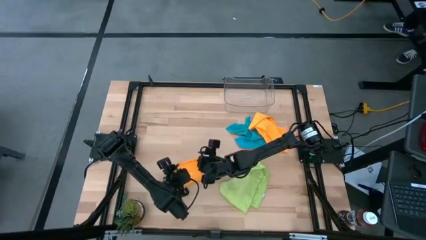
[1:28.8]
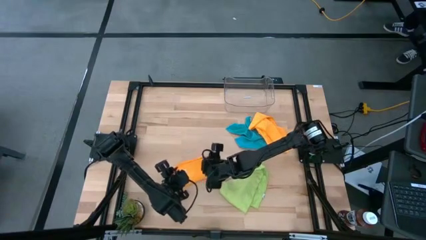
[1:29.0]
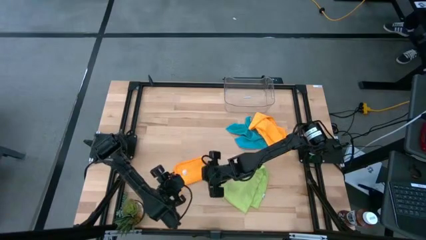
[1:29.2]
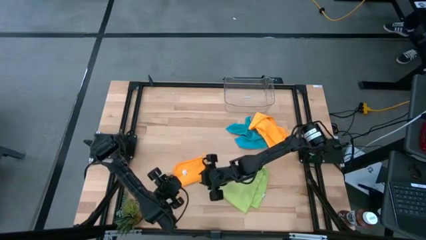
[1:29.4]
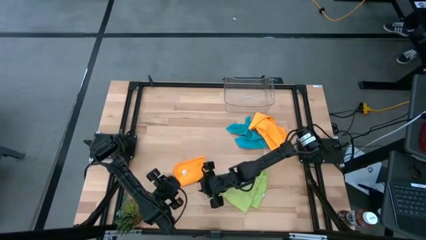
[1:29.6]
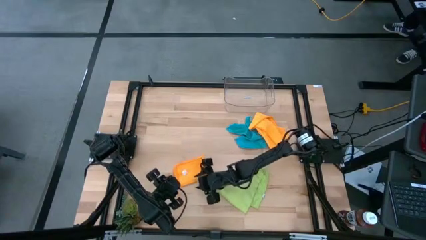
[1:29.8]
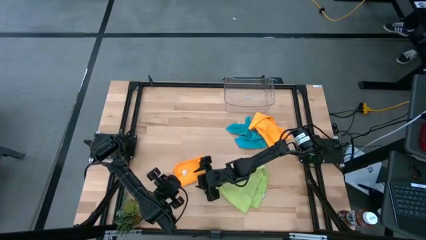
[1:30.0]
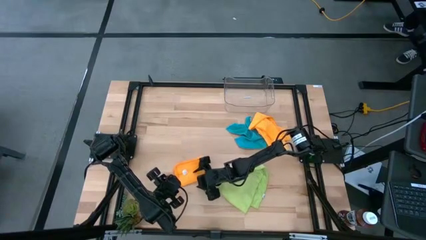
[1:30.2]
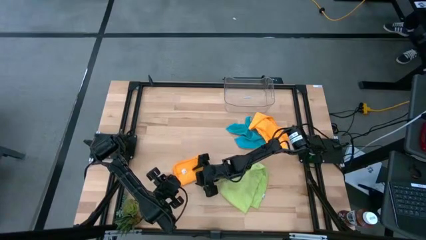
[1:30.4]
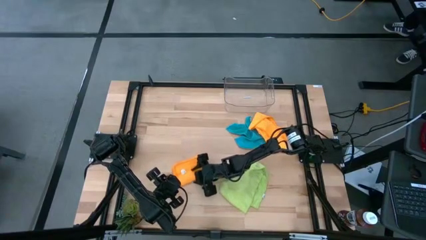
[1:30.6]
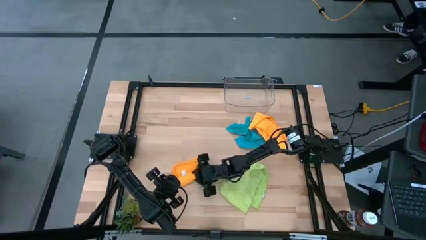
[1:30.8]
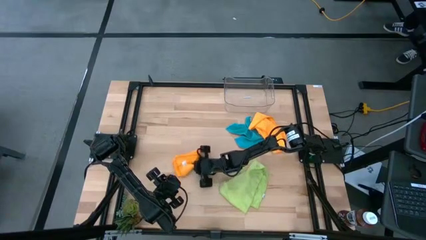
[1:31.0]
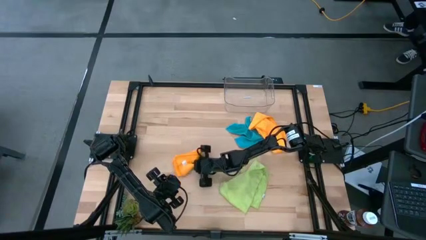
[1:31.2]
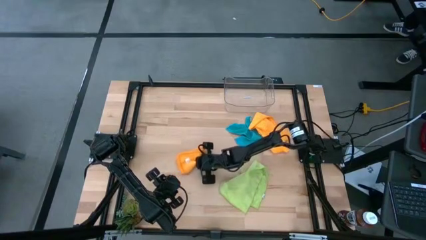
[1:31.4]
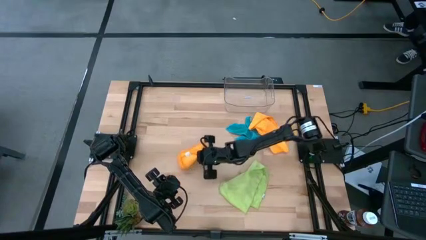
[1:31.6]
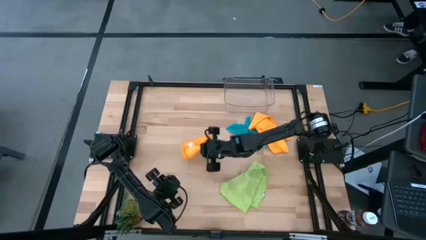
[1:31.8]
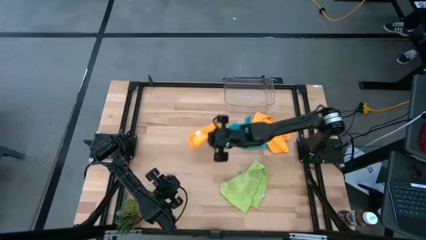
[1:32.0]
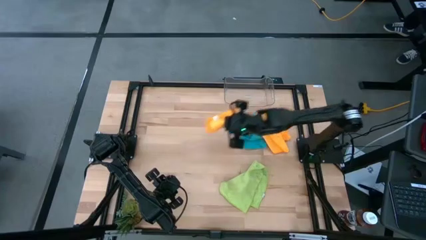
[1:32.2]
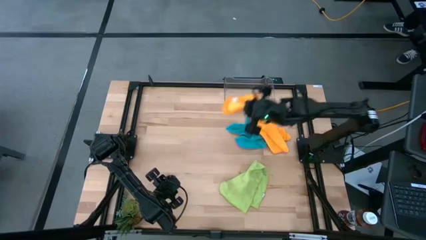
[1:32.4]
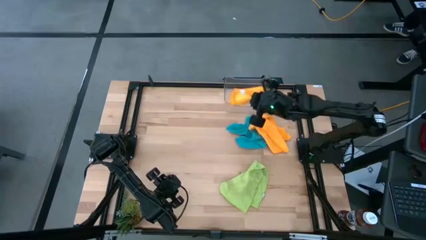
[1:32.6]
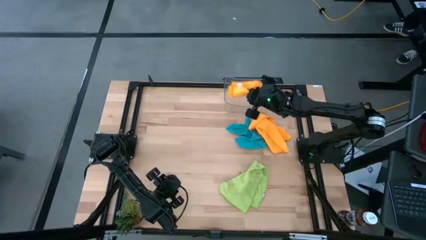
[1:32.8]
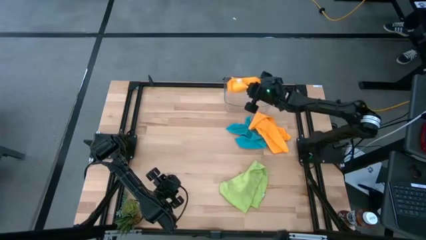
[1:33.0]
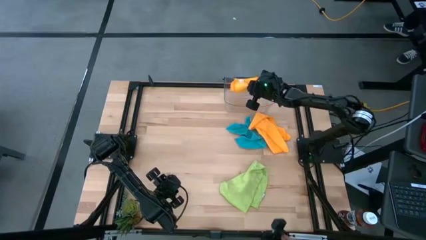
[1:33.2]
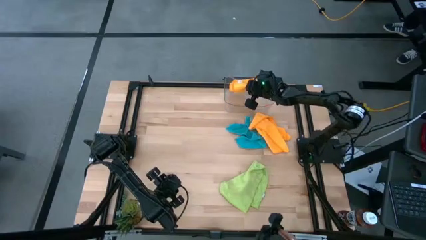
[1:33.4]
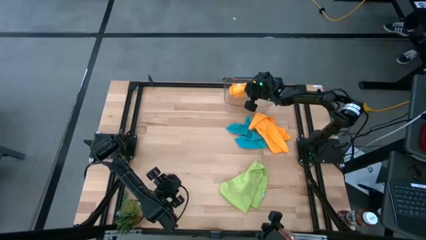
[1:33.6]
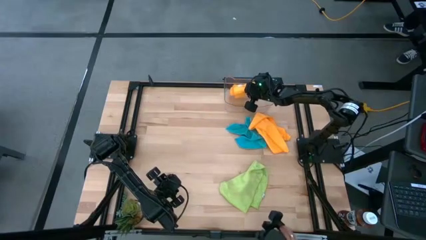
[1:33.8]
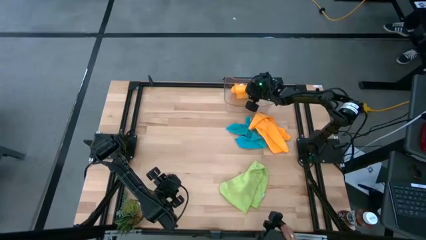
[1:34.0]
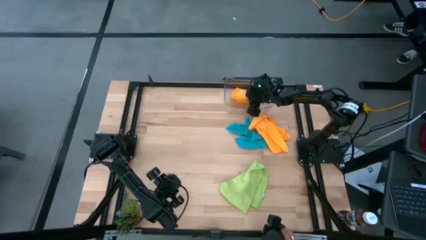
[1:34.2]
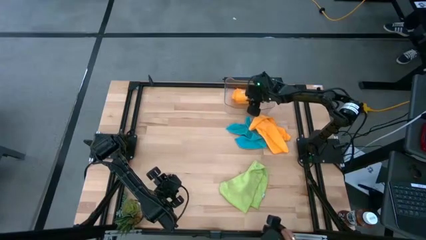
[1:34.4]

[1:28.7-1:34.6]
Task: Fold microfiber towels
Put the left yellow microfiber cloth into the transparent bin

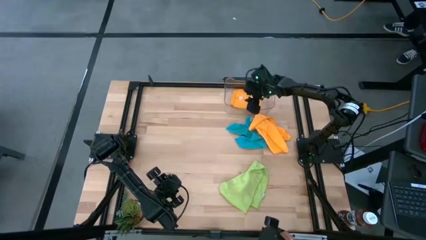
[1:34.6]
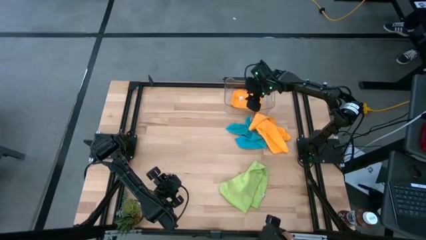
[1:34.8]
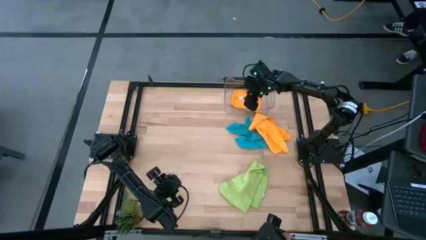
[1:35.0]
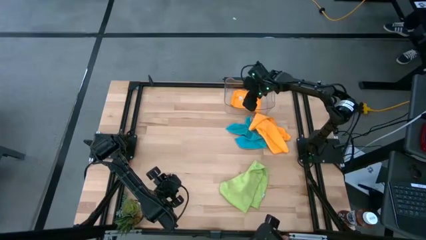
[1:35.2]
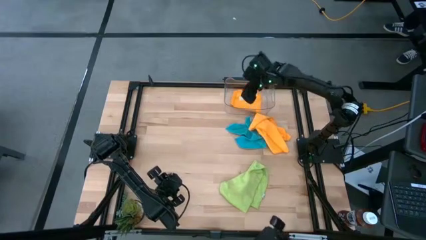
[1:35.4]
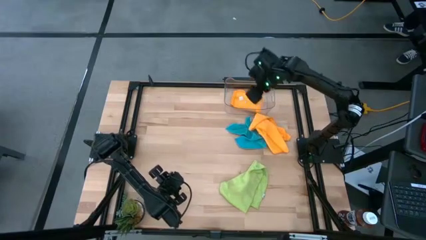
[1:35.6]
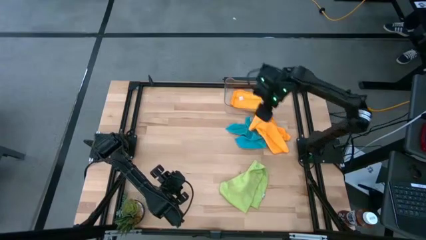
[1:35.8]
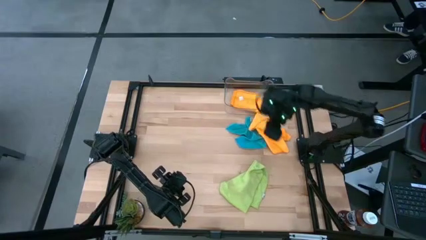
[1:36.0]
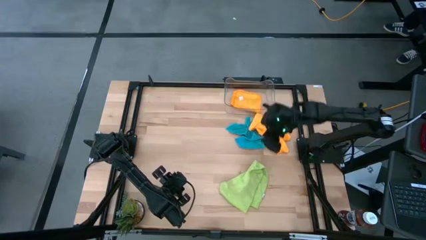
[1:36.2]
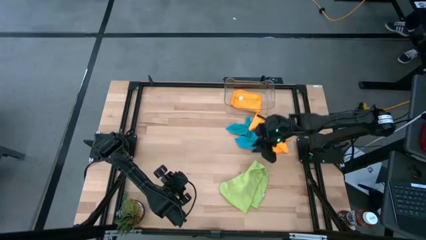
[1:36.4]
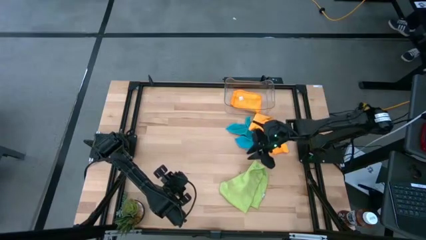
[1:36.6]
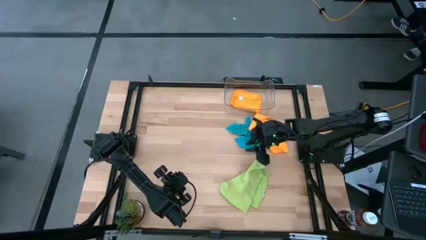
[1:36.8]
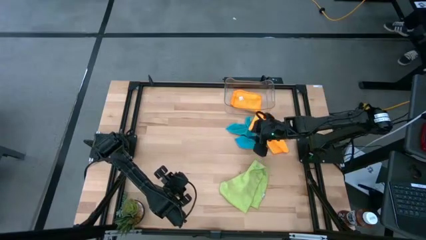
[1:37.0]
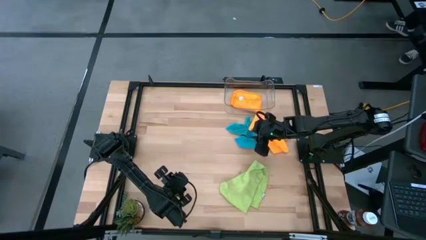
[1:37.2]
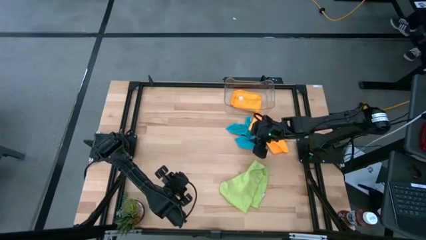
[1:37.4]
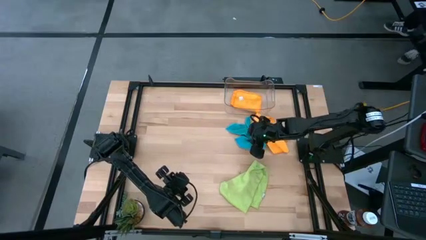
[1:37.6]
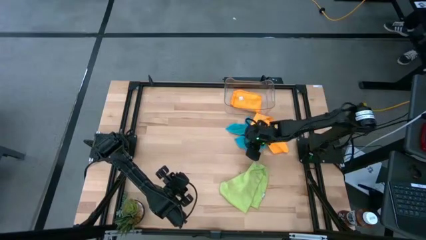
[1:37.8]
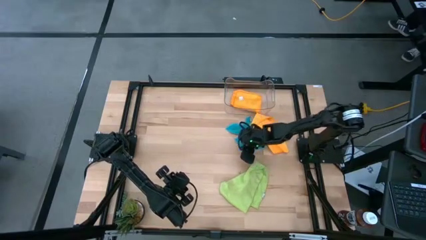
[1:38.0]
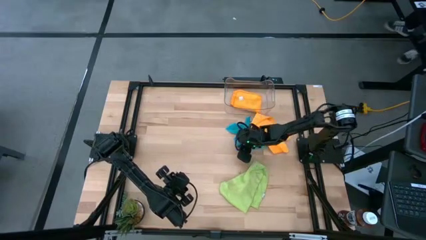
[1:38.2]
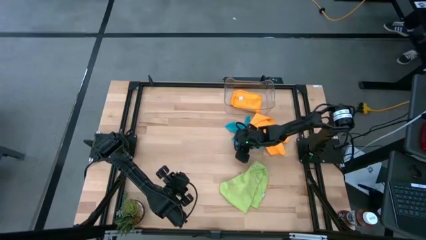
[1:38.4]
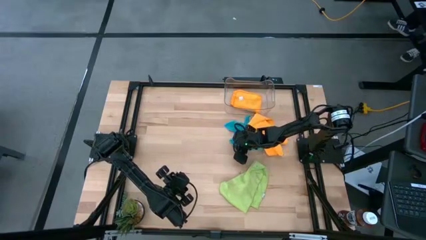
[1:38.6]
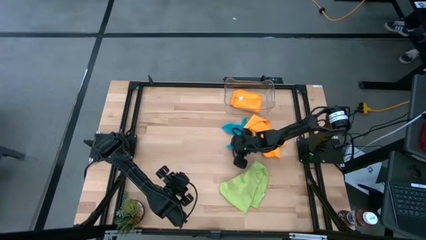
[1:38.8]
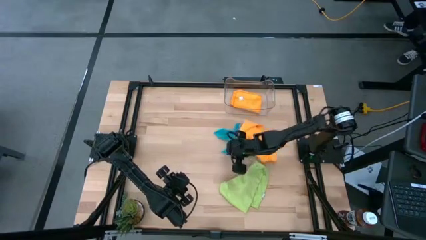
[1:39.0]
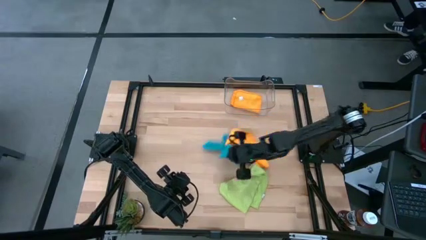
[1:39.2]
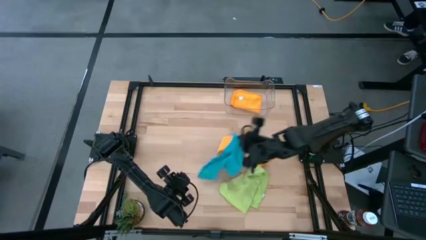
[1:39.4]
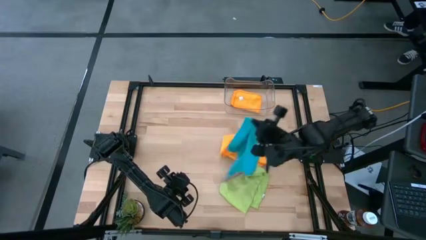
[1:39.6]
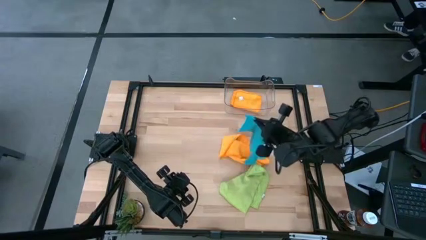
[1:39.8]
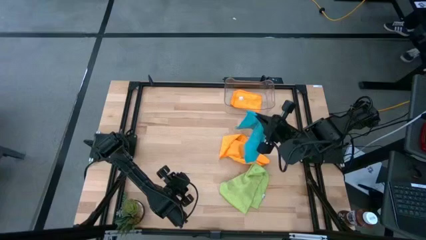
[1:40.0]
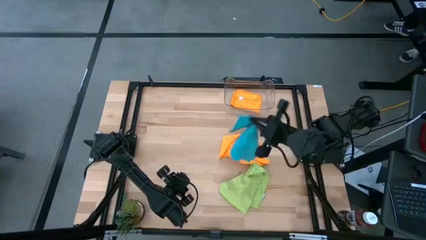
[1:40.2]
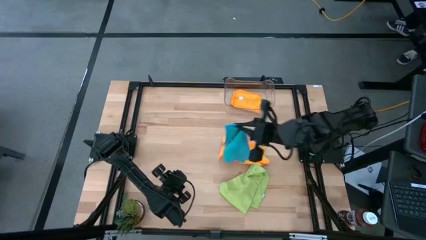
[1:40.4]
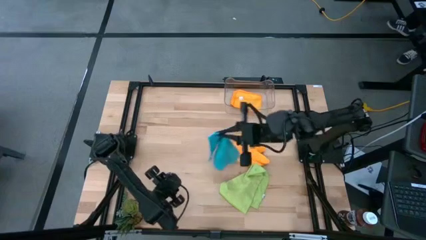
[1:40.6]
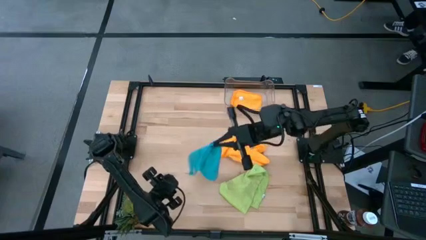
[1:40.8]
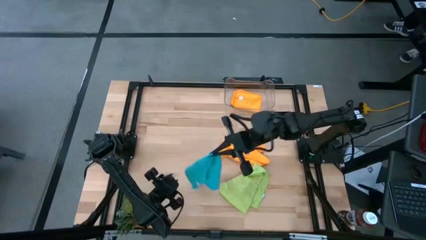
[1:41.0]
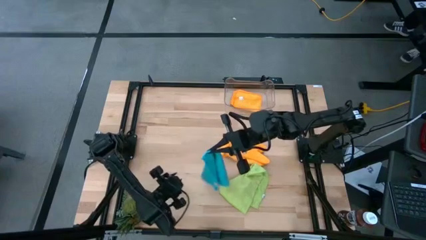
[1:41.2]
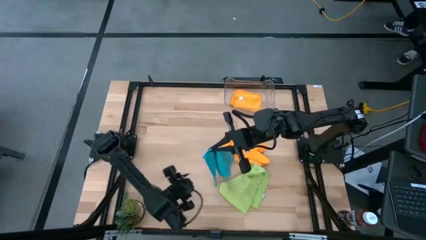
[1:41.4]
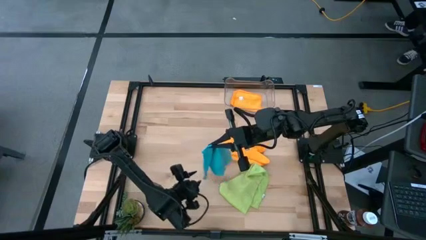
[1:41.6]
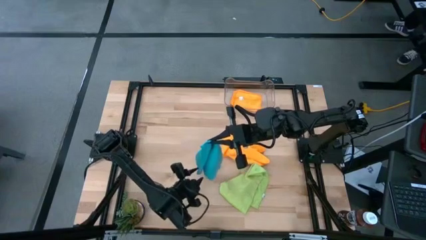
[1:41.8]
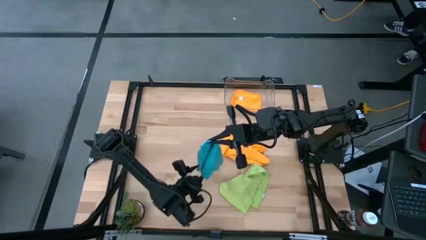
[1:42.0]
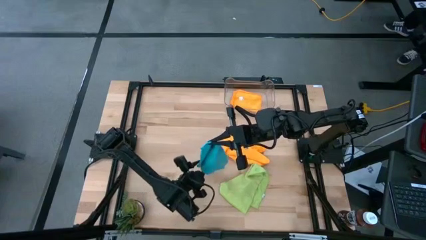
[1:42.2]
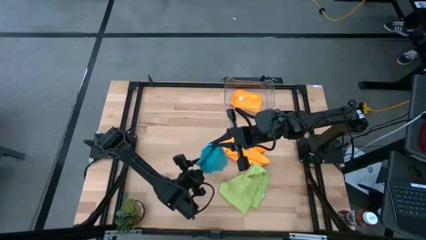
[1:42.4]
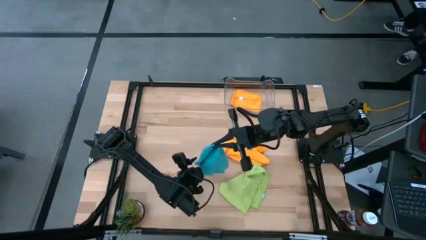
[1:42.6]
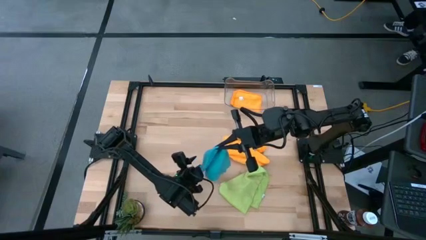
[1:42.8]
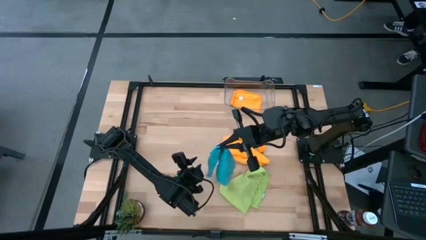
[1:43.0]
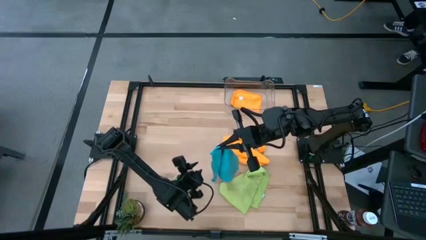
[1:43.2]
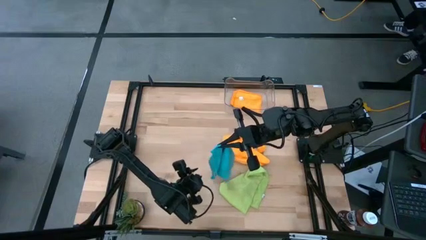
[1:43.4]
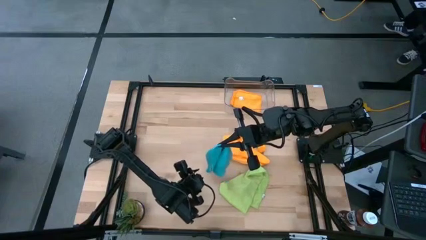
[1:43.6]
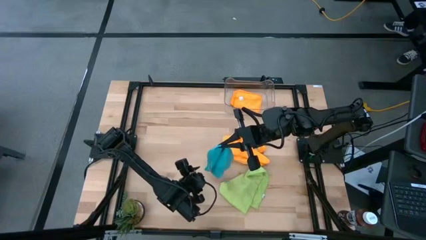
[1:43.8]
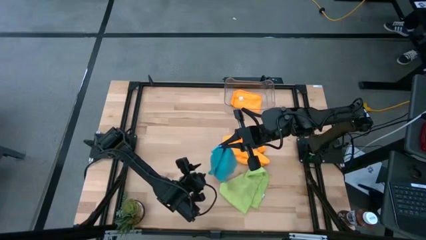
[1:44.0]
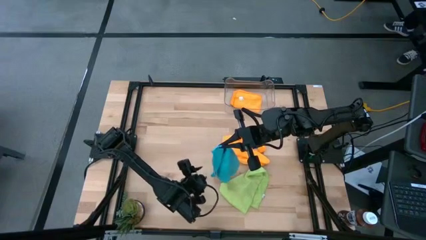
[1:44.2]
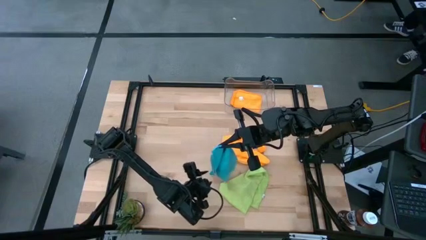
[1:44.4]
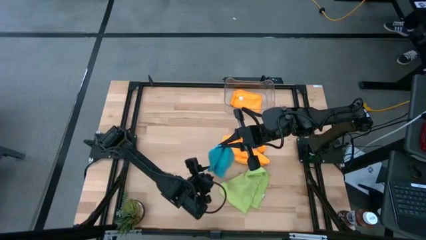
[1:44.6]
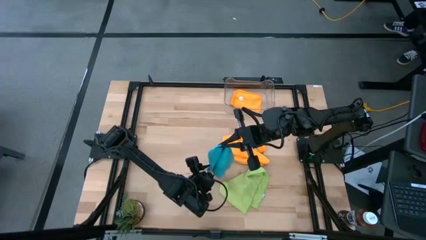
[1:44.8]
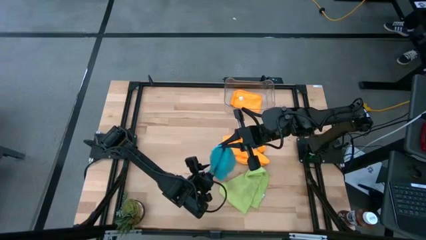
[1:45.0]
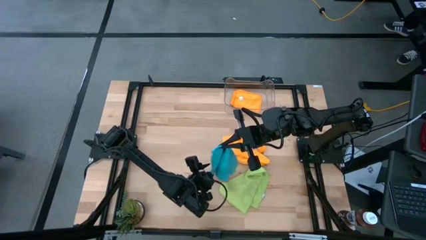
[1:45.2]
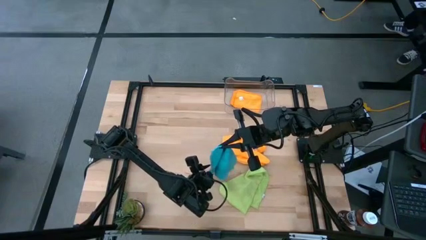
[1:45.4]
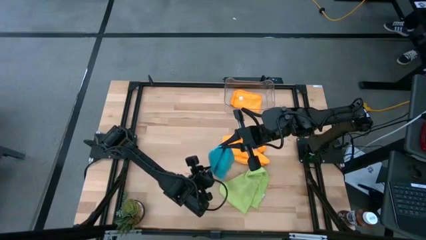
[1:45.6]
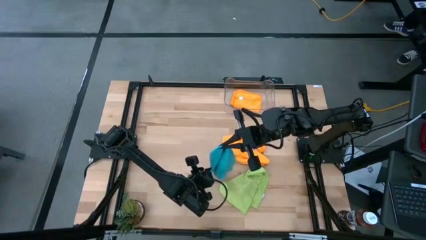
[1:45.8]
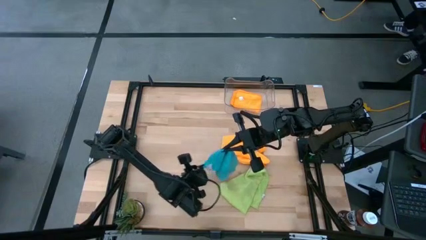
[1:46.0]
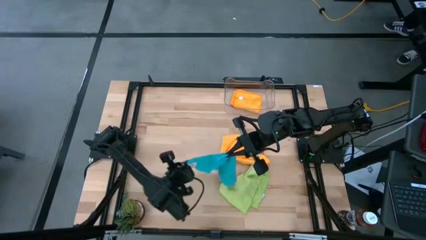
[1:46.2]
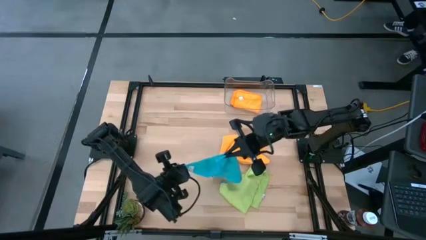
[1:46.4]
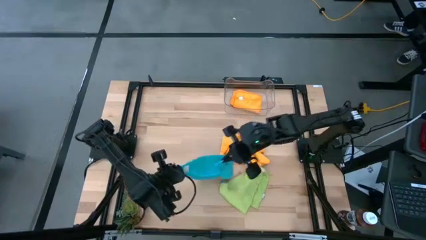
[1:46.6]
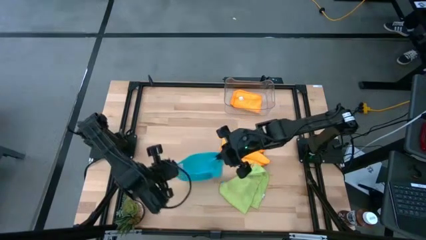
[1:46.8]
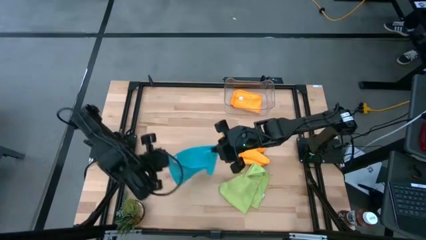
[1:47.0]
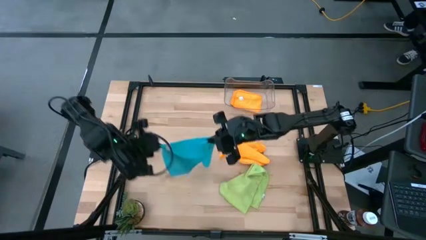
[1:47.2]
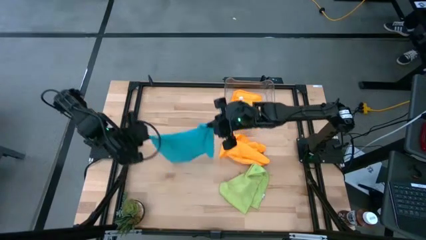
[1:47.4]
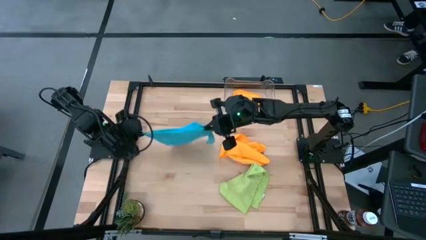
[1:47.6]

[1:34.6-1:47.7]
Fold the blue microfiber cloth
